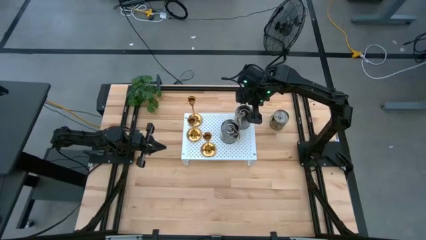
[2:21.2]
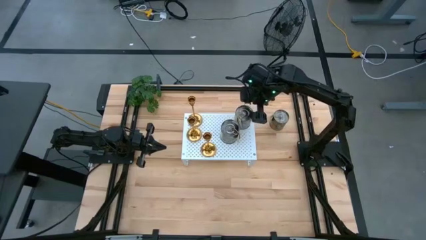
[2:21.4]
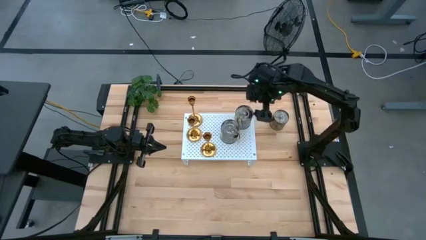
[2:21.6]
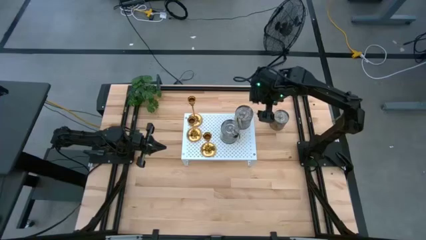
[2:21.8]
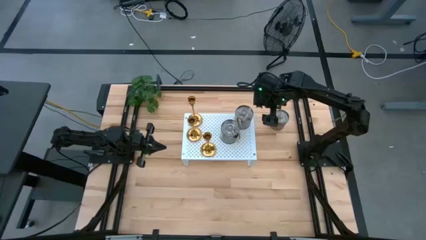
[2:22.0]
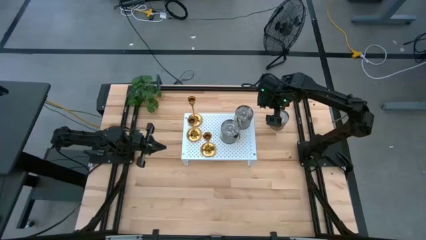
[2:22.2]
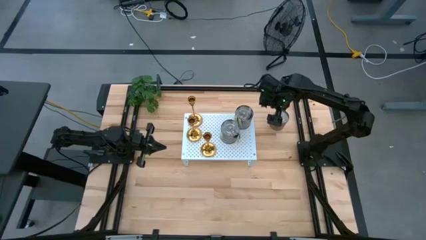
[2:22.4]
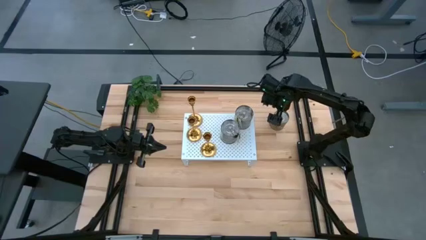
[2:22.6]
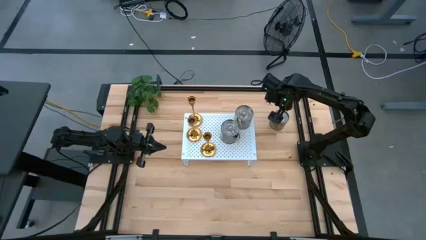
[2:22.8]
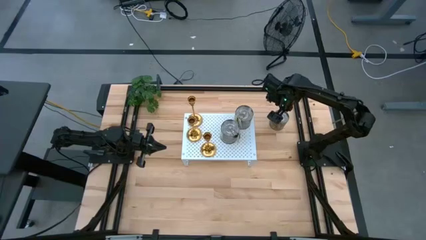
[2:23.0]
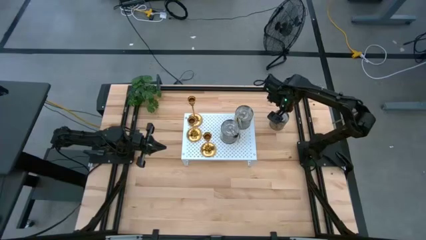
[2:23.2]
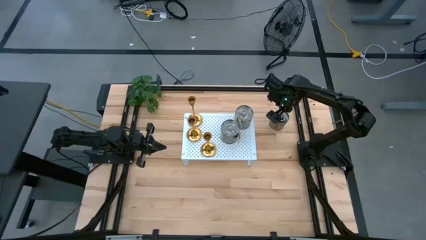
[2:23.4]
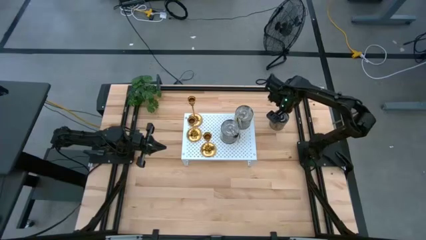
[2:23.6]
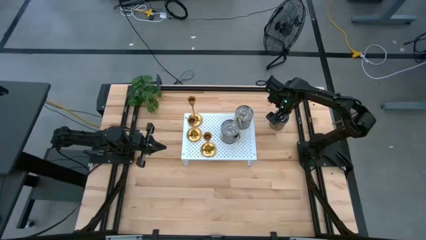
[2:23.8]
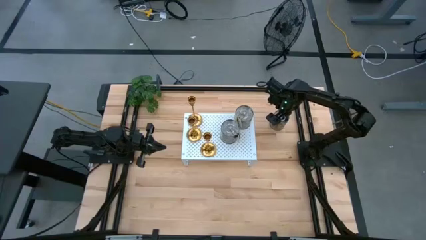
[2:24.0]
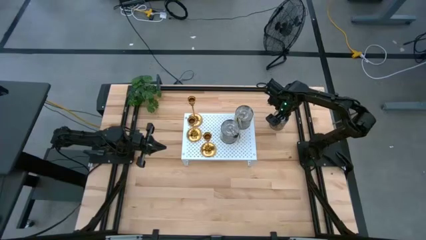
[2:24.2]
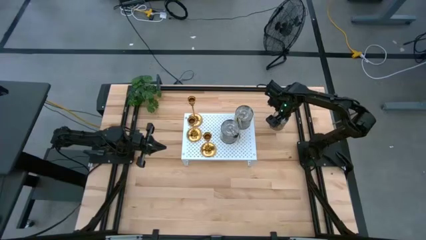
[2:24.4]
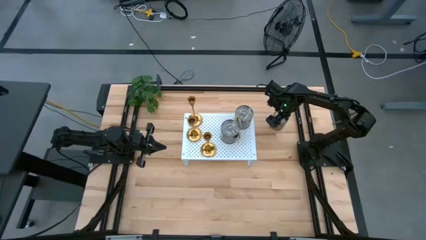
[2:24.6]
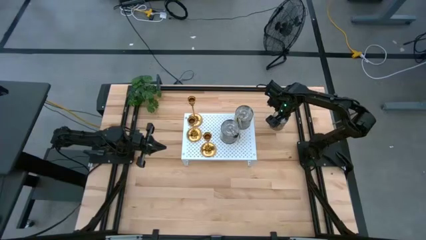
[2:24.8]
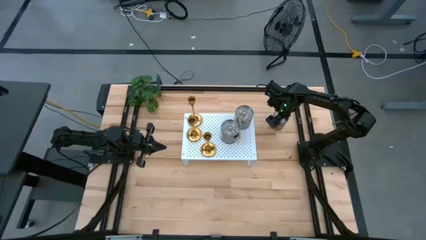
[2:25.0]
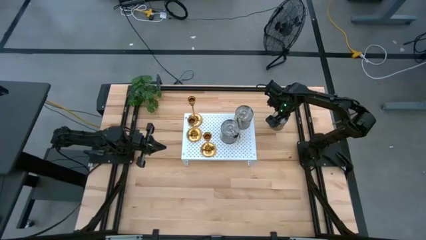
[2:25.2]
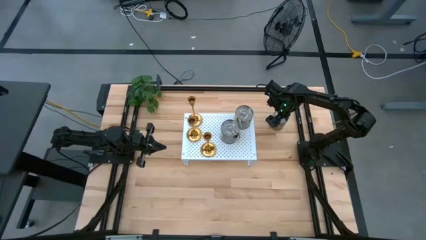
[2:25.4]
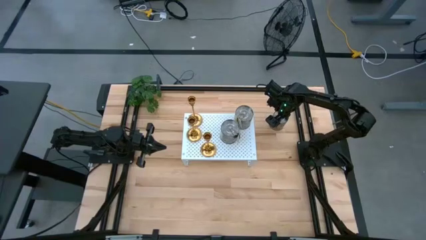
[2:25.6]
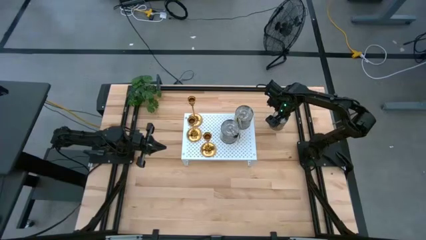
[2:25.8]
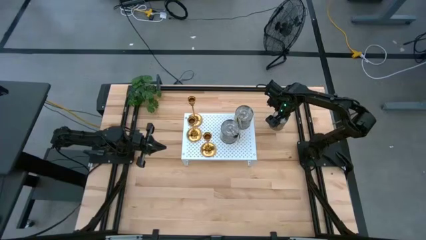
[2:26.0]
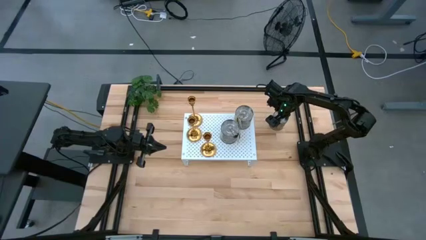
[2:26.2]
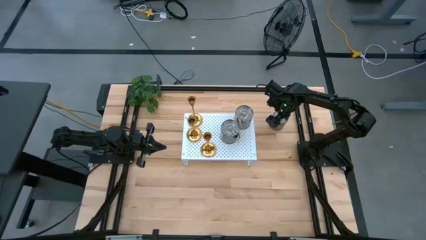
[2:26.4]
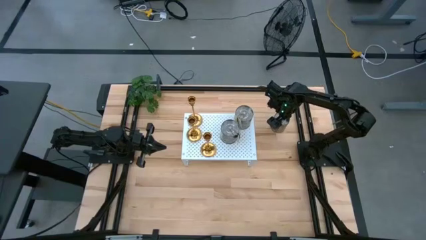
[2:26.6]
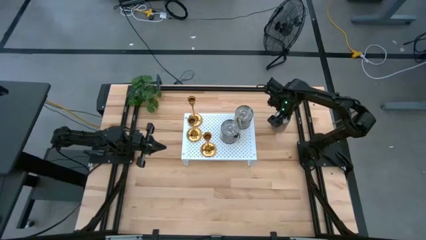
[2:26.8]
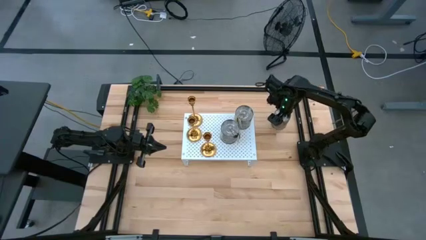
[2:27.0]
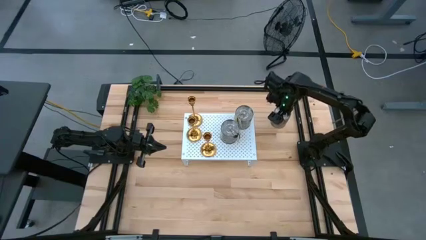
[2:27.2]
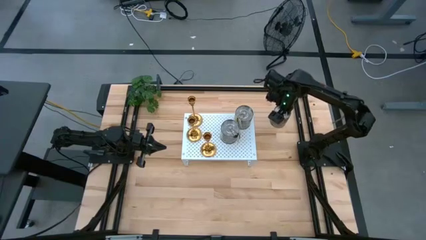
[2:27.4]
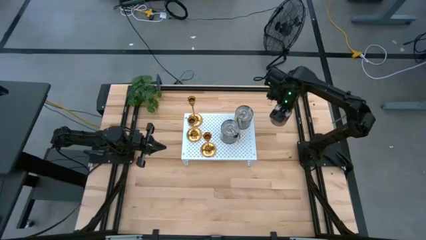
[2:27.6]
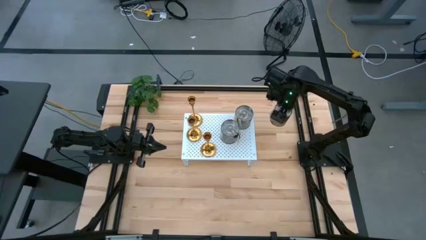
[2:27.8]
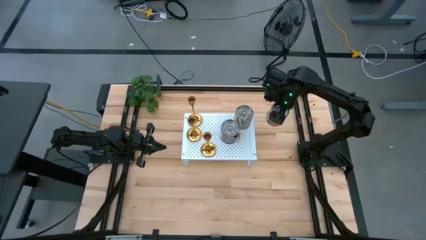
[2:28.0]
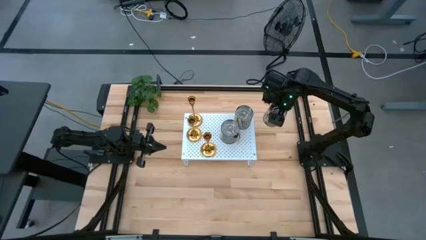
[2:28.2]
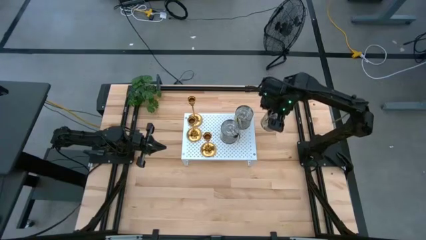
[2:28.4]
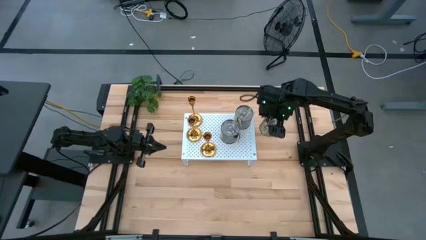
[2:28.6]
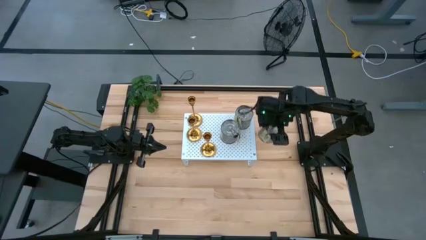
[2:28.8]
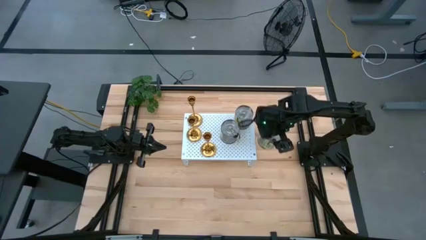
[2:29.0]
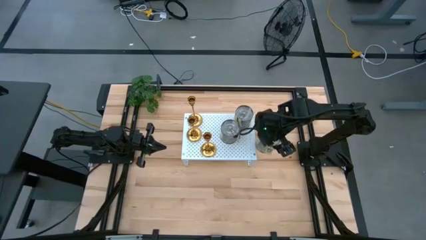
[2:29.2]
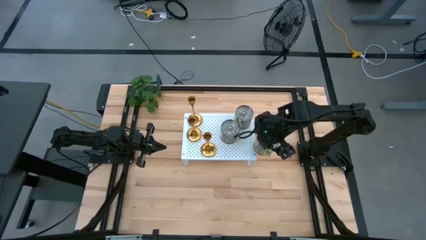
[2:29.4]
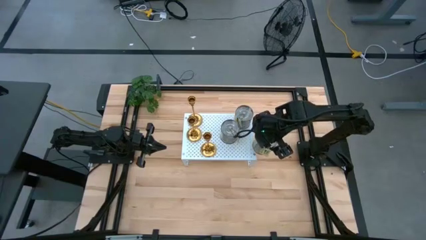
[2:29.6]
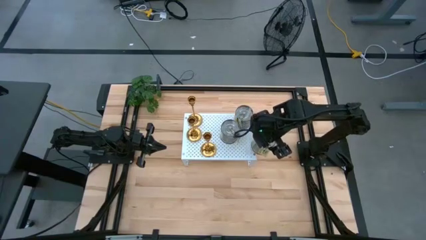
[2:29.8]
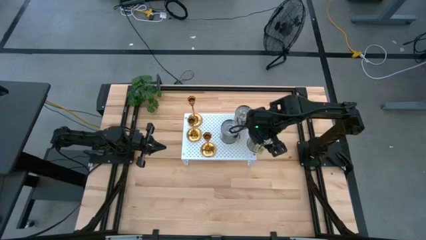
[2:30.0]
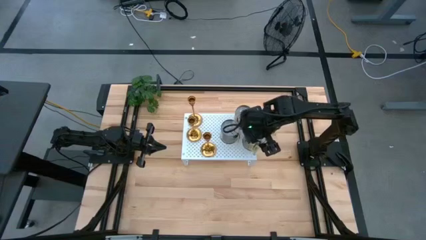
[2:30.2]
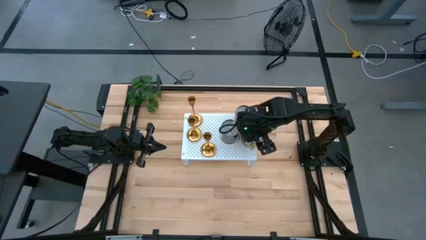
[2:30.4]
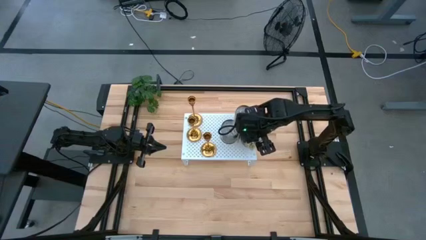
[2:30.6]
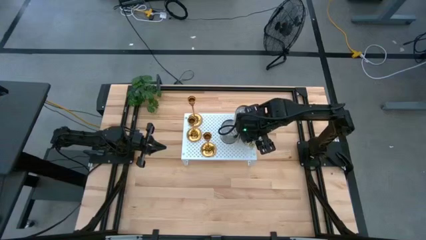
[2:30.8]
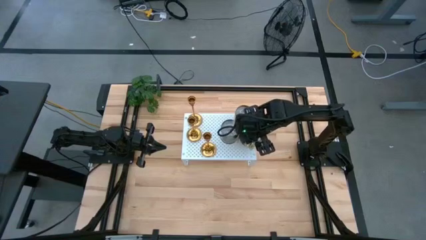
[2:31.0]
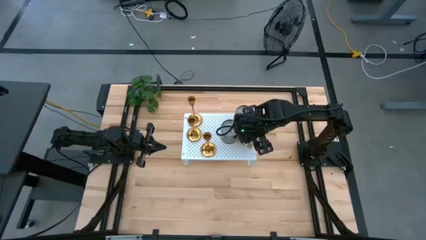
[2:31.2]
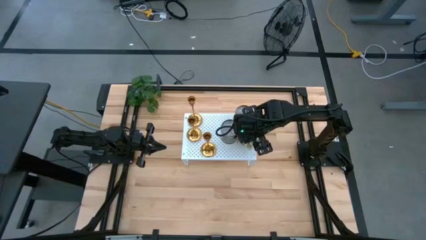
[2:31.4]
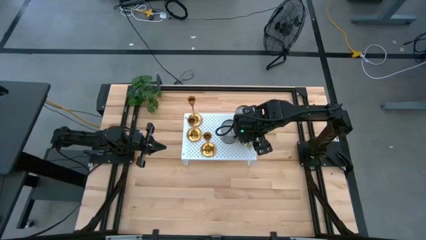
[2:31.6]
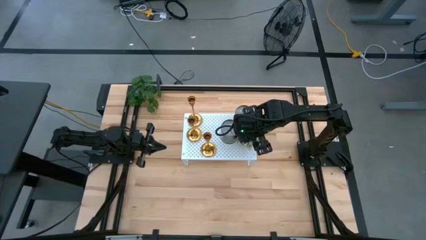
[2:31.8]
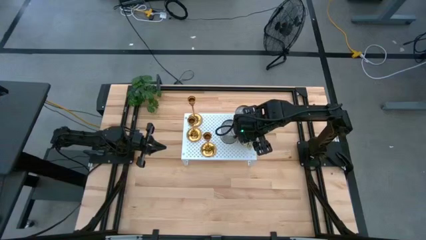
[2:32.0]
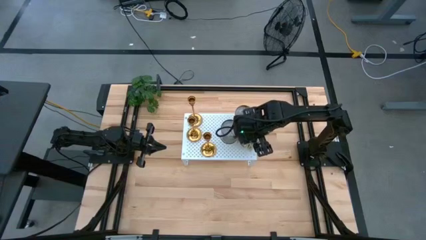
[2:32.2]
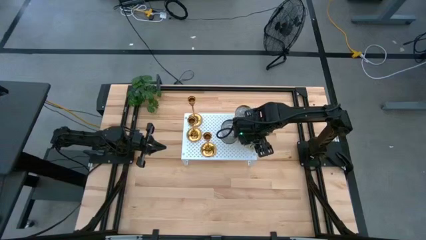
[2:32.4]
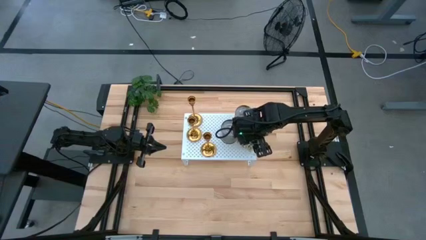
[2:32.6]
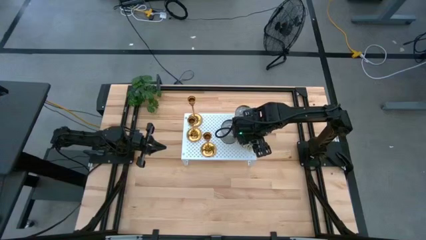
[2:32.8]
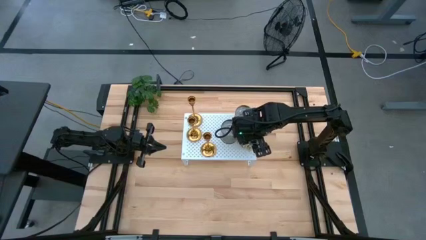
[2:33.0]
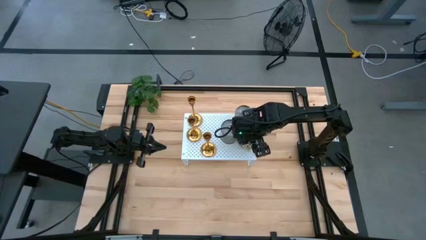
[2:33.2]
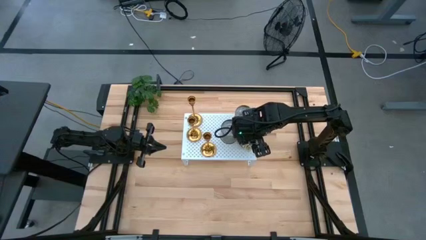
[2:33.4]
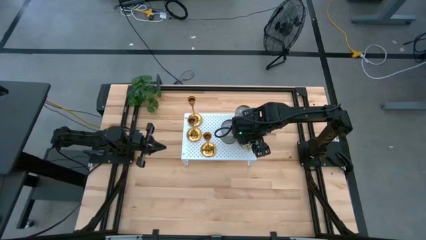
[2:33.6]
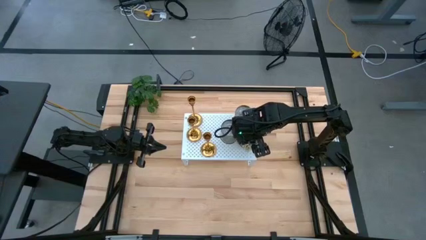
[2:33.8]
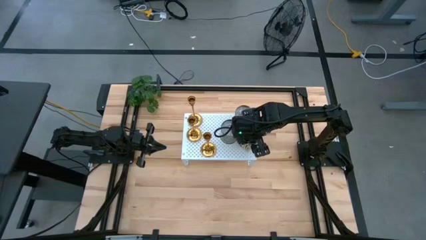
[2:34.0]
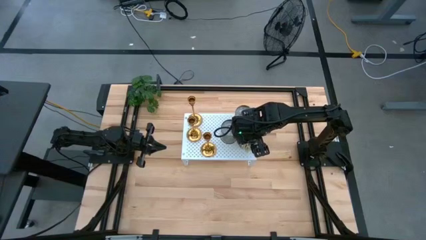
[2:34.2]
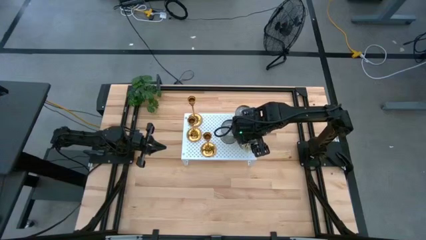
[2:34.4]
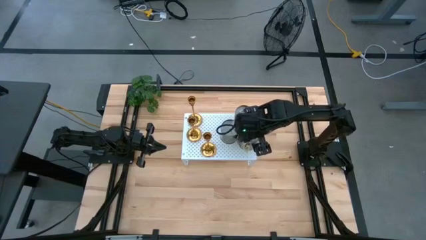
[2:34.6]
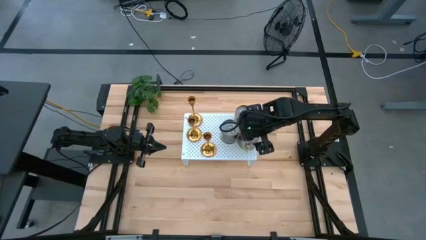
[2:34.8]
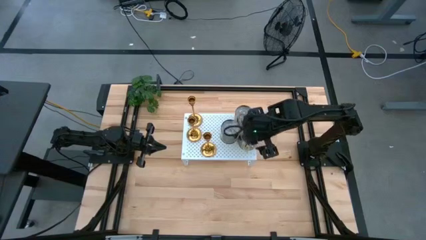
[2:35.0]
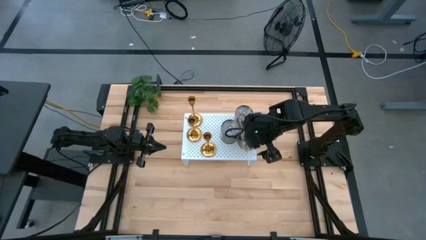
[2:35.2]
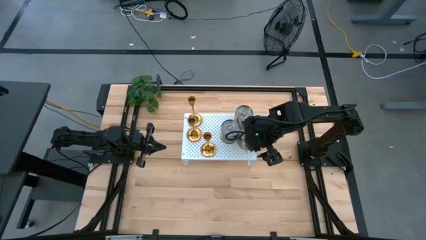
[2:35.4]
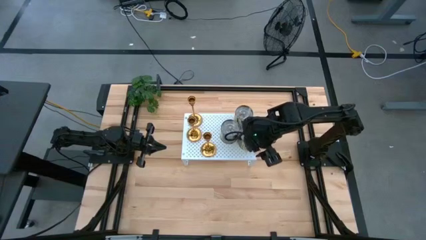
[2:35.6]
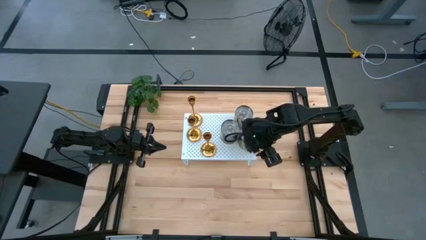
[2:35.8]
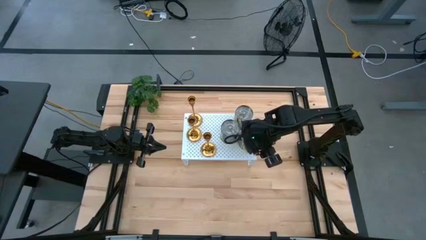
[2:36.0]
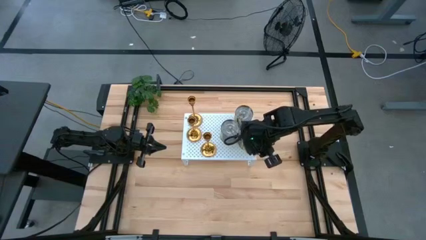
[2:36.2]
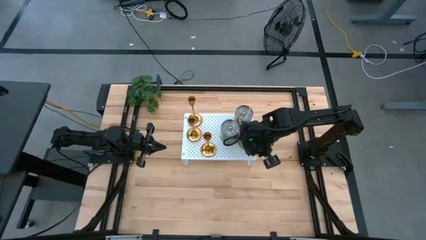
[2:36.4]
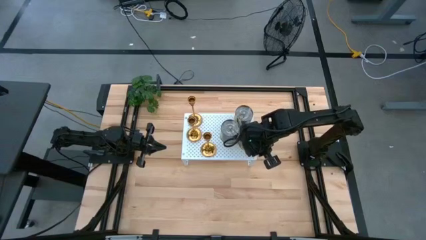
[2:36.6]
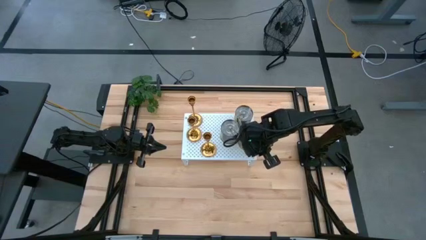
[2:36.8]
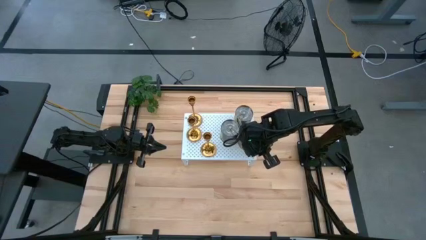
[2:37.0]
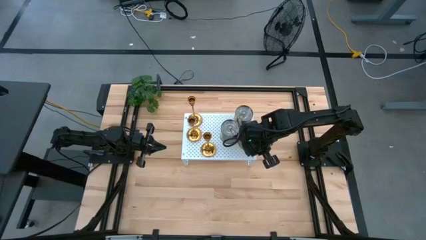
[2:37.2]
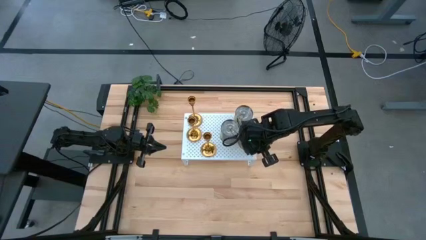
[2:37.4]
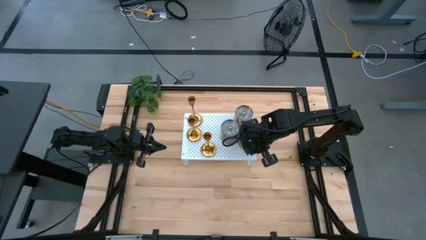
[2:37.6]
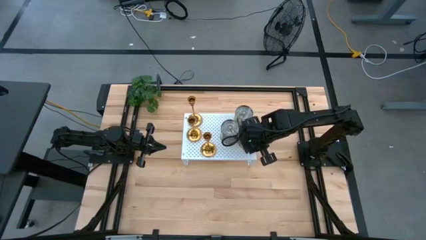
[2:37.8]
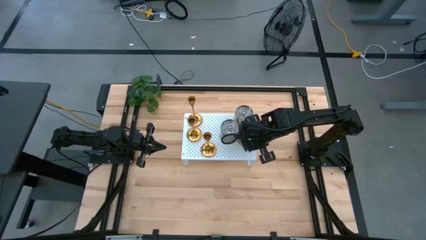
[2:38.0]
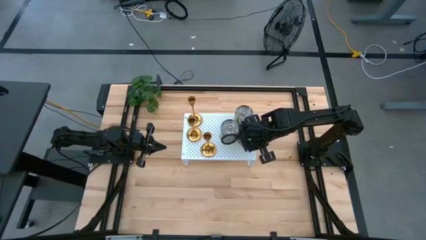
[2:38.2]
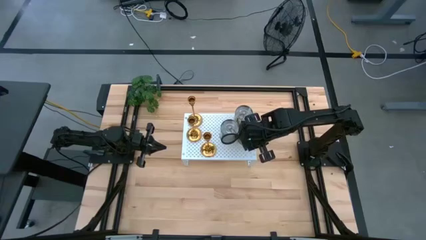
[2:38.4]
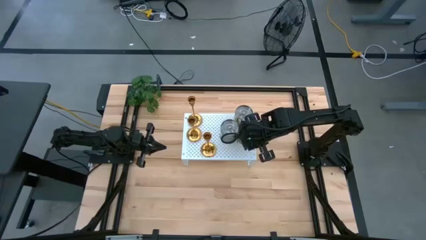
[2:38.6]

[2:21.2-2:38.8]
Task: Pick & Place candle stick holders
Put the metal lid scented candle on the shelf
